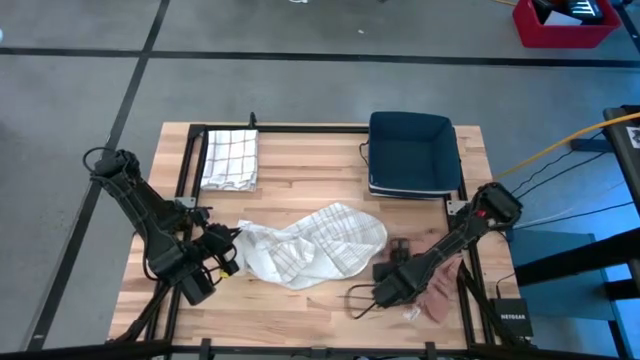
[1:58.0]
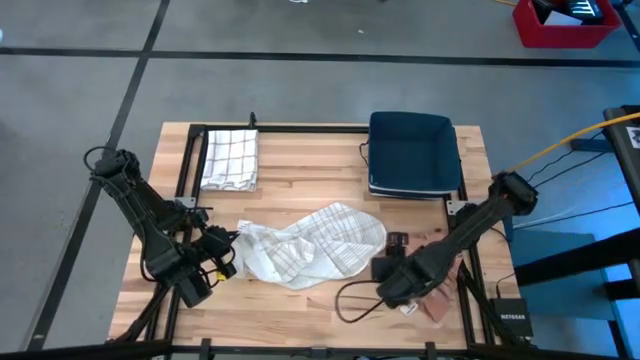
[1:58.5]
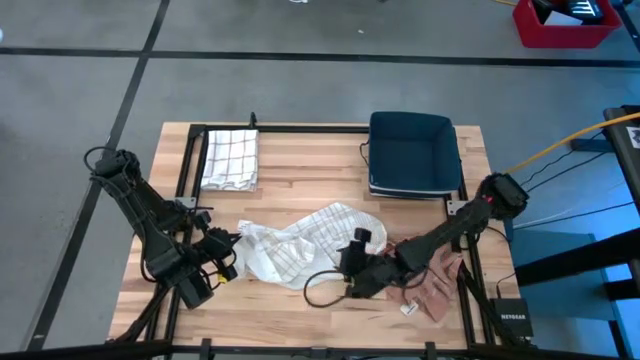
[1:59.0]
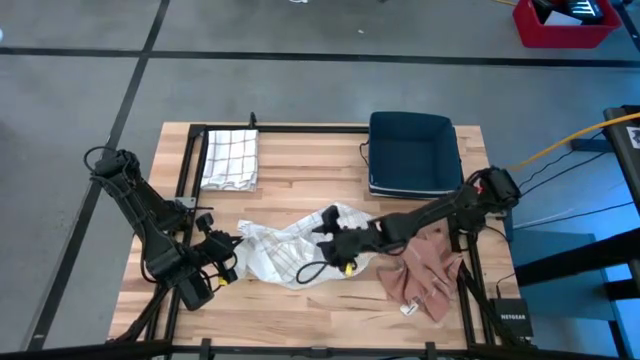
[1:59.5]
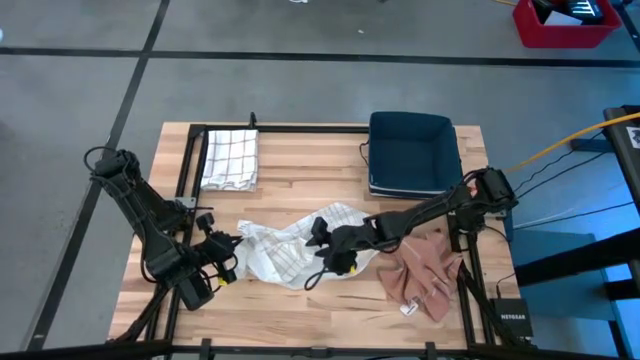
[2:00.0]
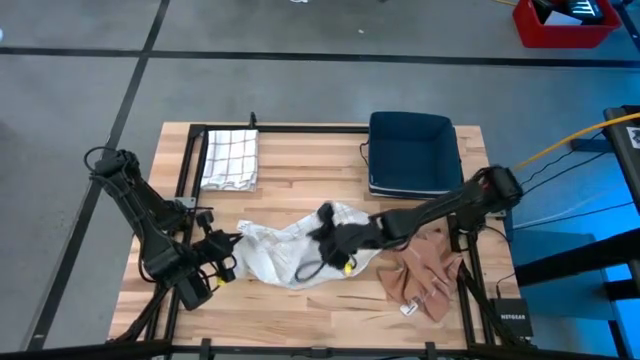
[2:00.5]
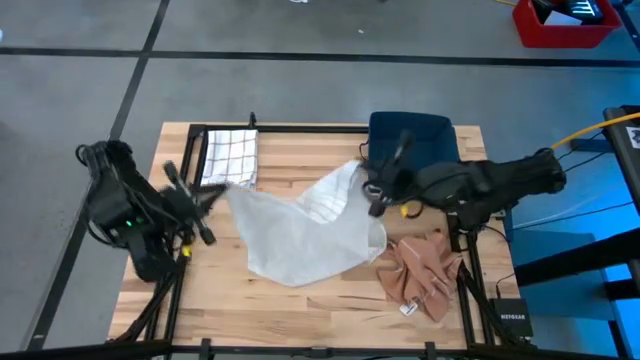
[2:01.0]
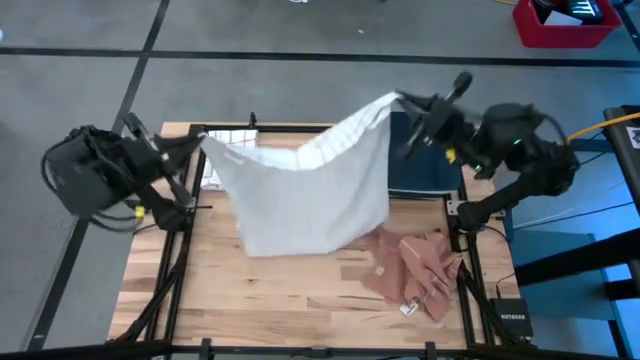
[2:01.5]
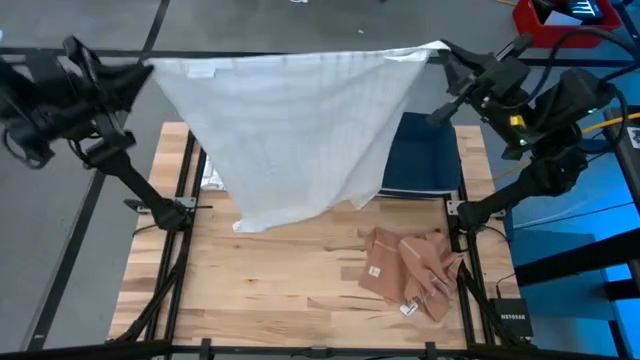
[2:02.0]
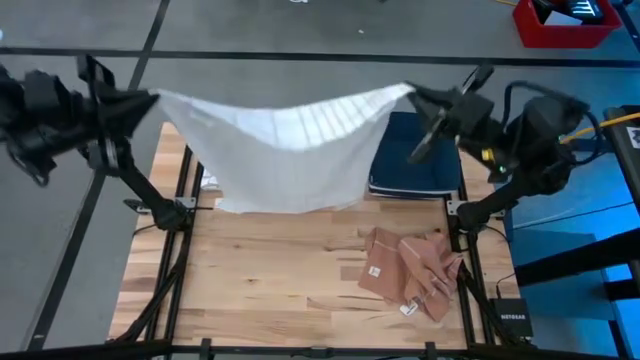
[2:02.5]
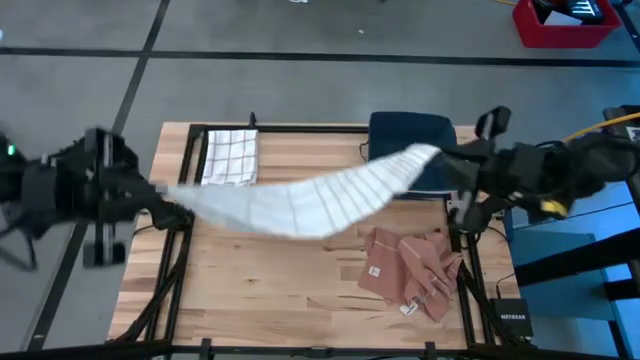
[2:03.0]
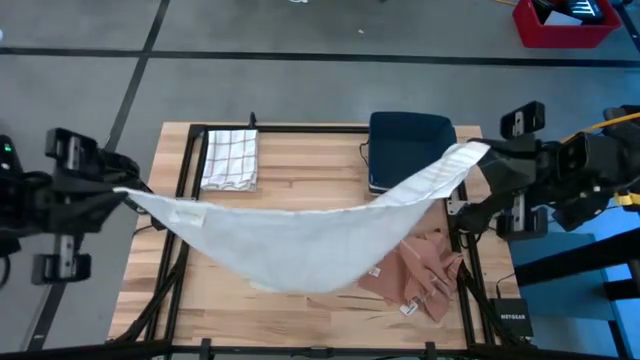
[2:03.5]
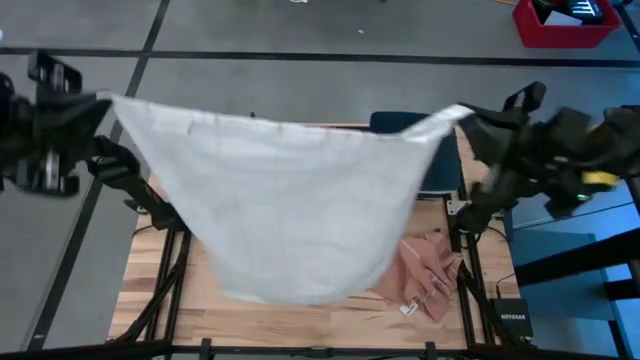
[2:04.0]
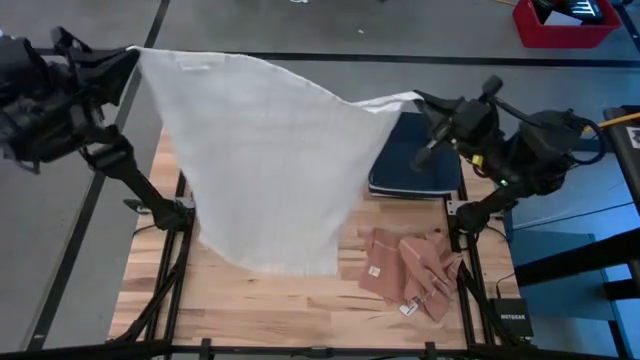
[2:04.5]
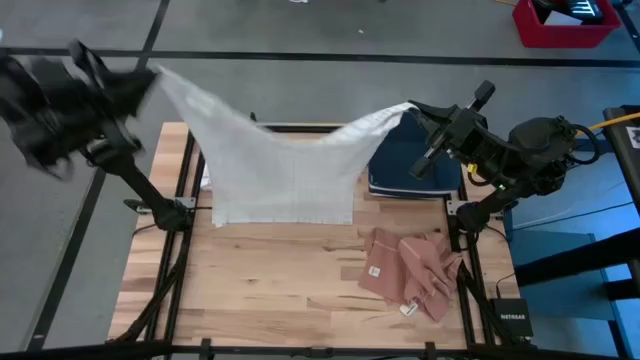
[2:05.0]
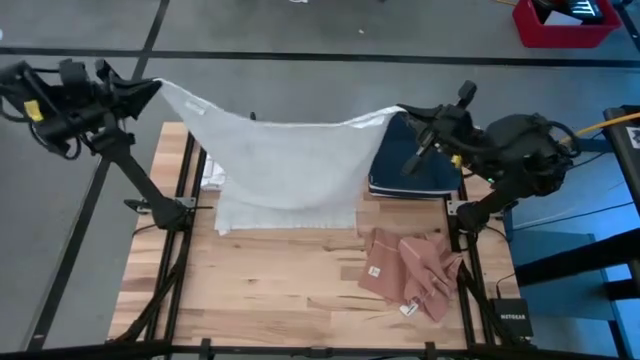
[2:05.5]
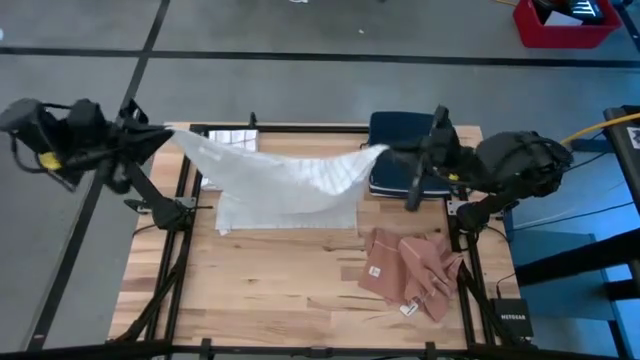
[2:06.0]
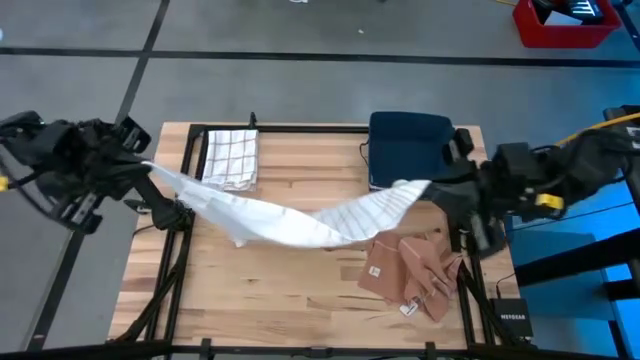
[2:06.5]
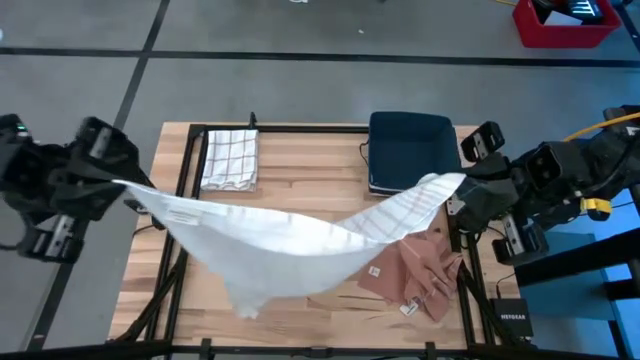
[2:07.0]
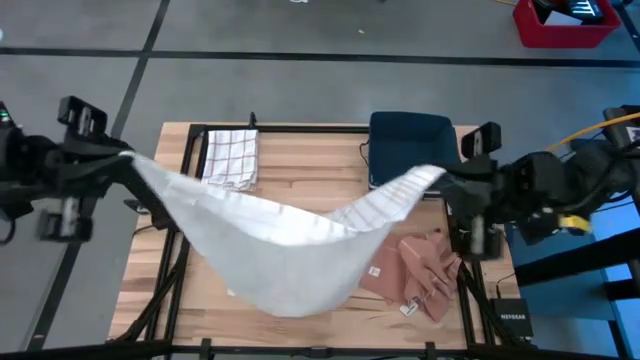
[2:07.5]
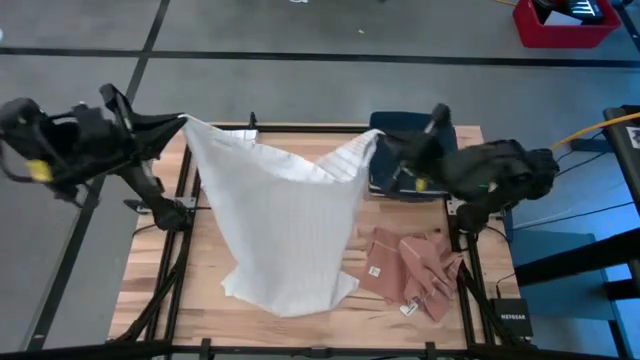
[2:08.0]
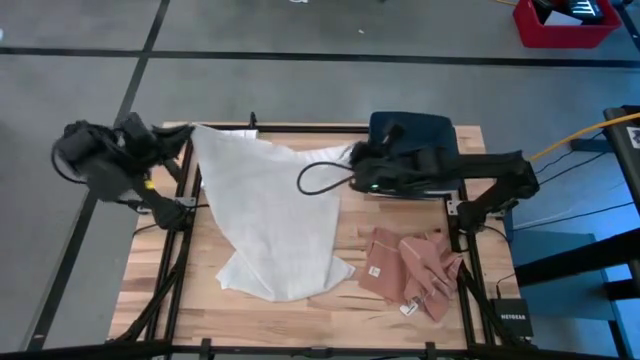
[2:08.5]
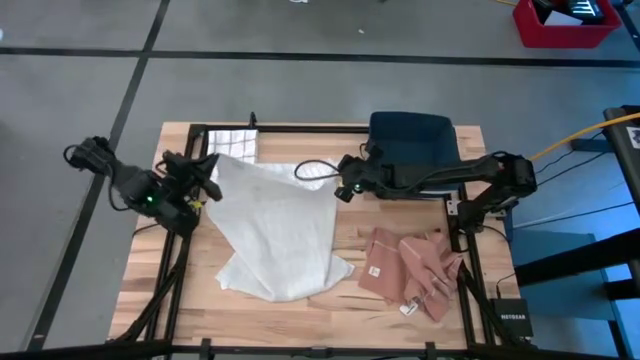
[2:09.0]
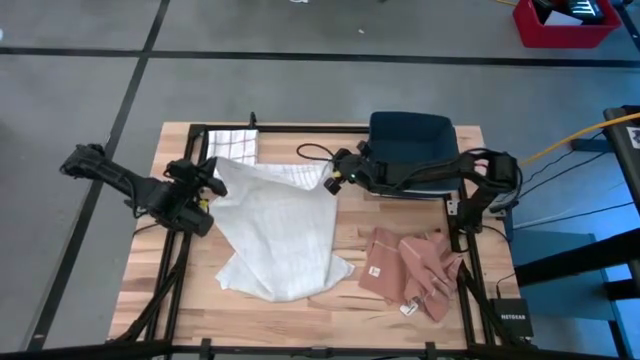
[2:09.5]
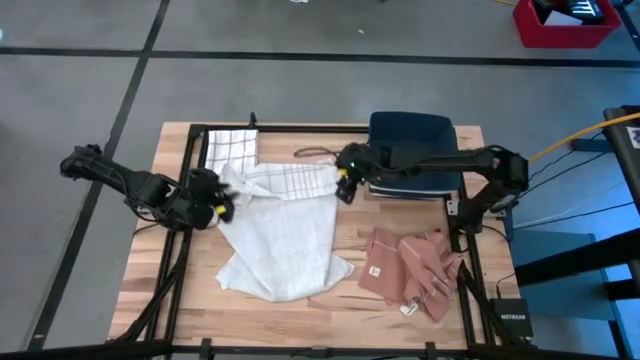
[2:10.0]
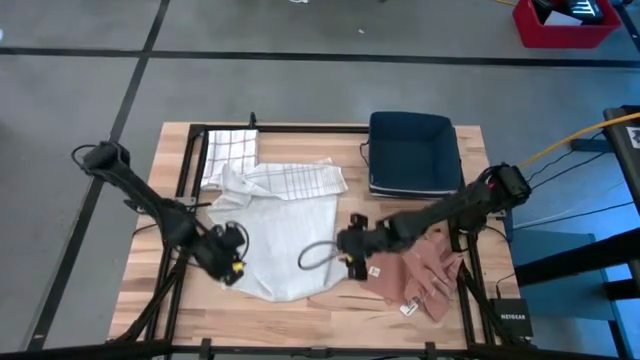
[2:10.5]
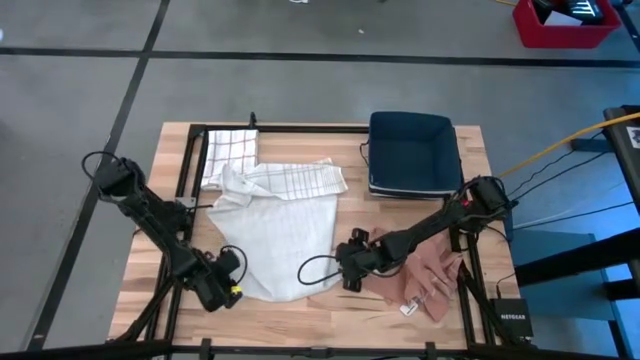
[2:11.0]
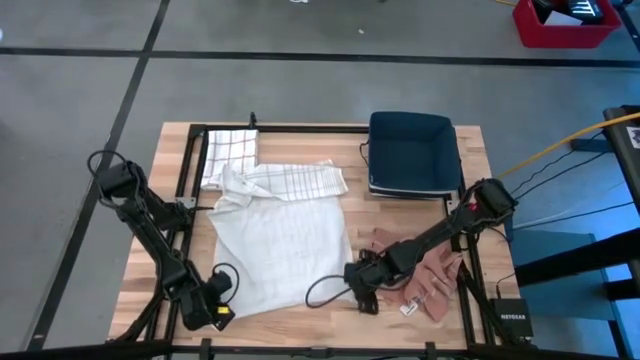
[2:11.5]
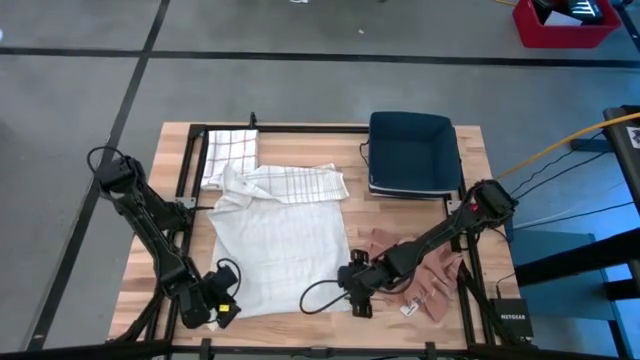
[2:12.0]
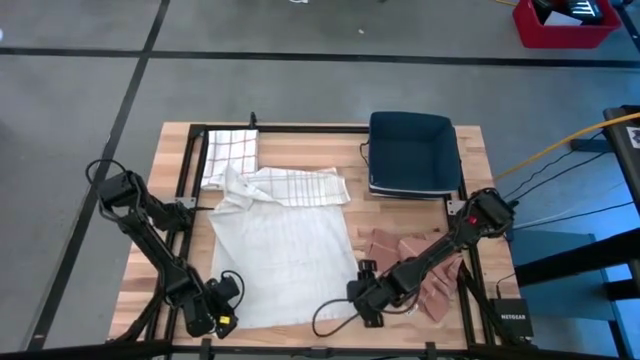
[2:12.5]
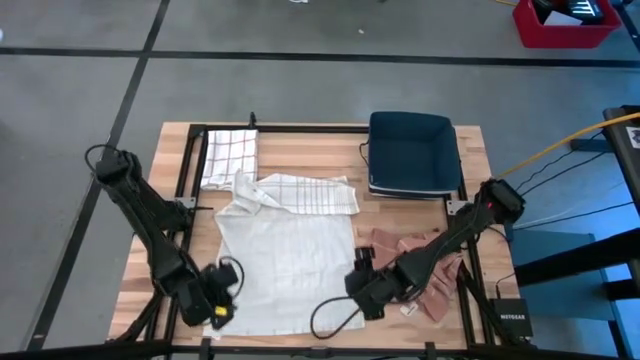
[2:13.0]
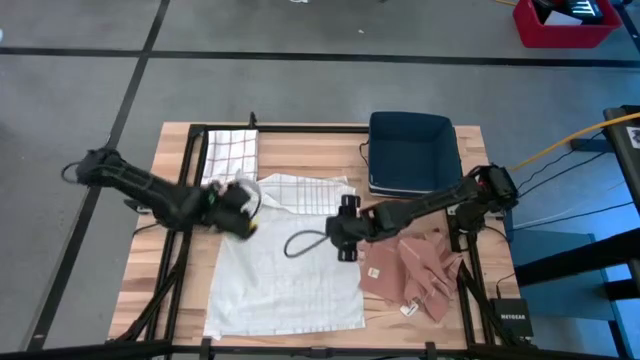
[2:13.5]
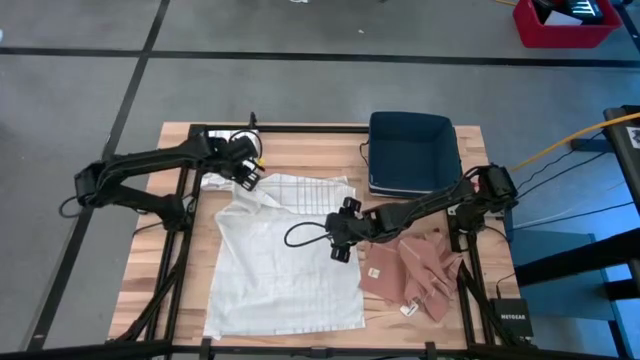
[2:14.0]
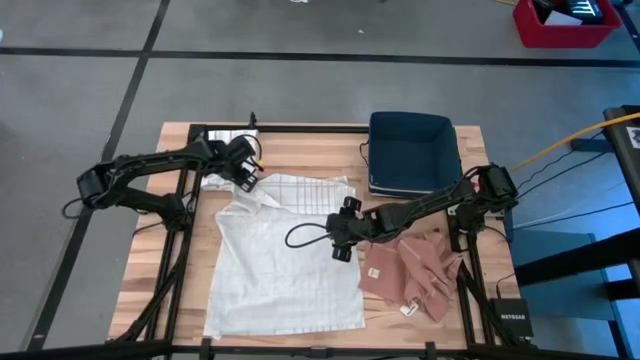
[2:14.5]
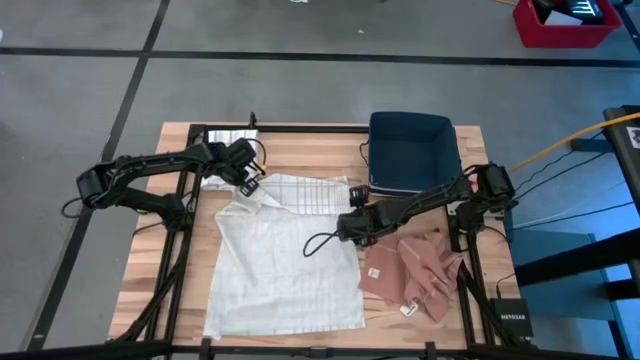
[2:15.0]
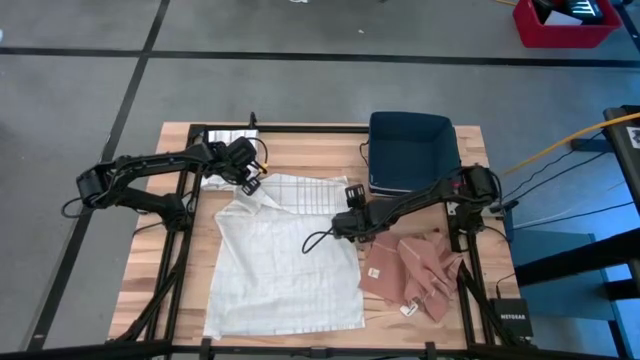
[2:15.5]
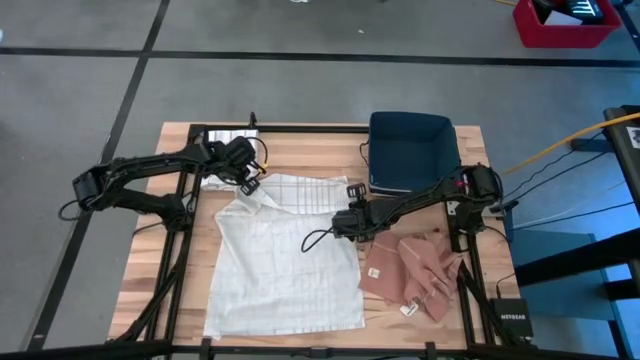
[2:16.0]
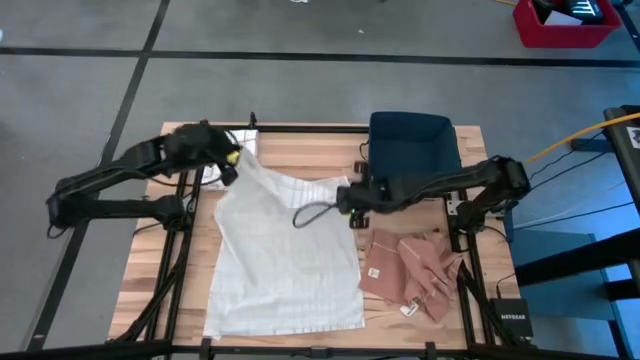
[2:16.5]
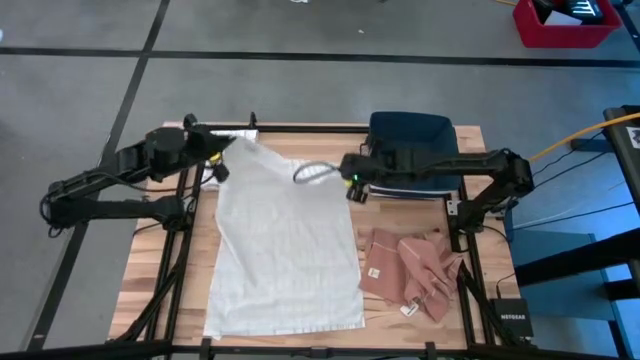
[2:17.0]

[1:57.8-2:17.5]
Task: Fold towel
Fold the white towel on the table
